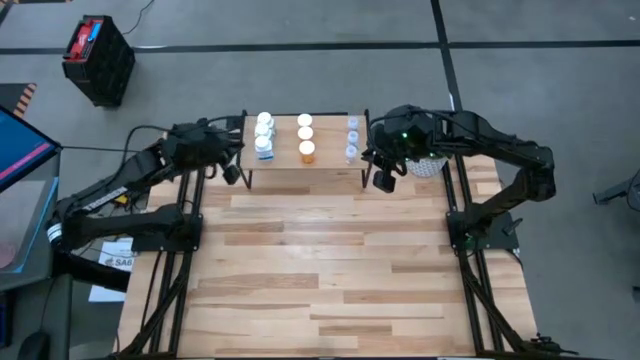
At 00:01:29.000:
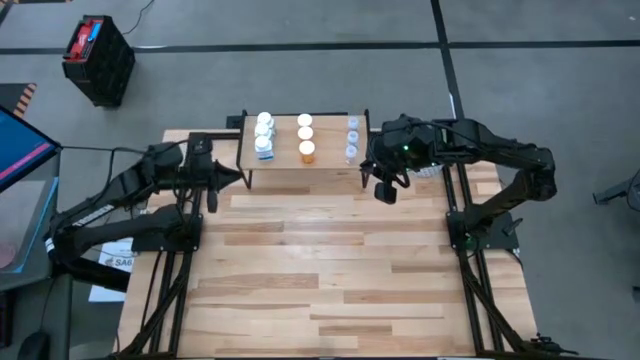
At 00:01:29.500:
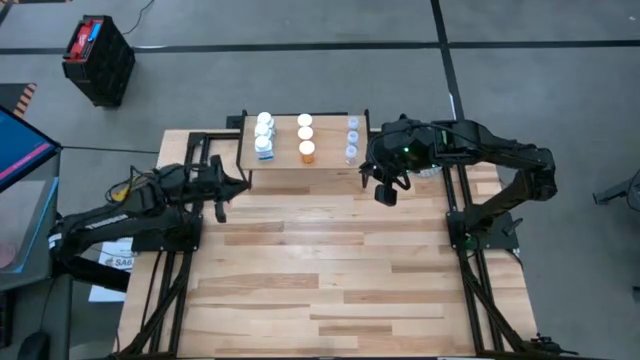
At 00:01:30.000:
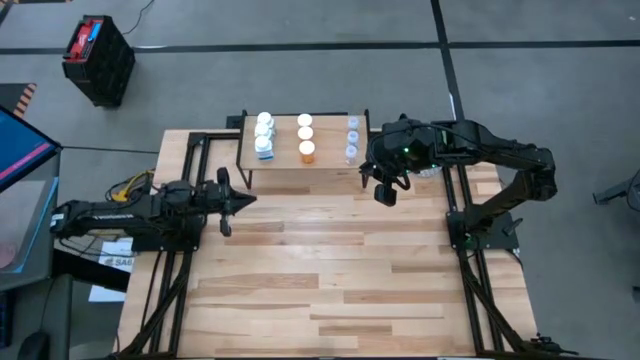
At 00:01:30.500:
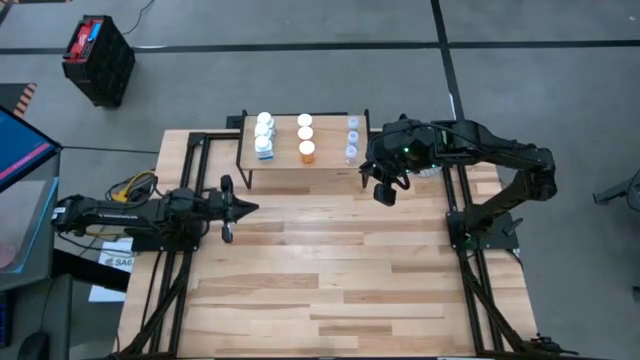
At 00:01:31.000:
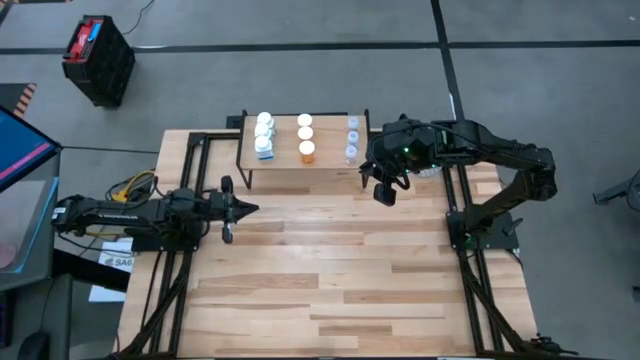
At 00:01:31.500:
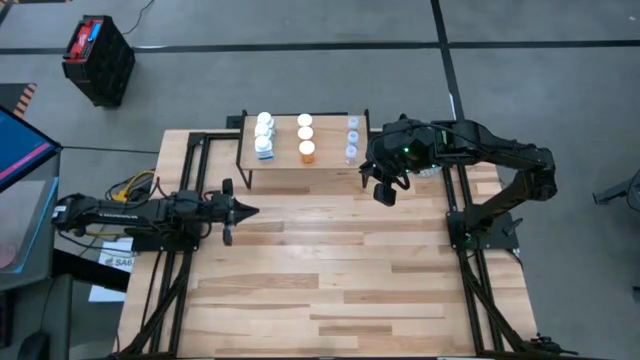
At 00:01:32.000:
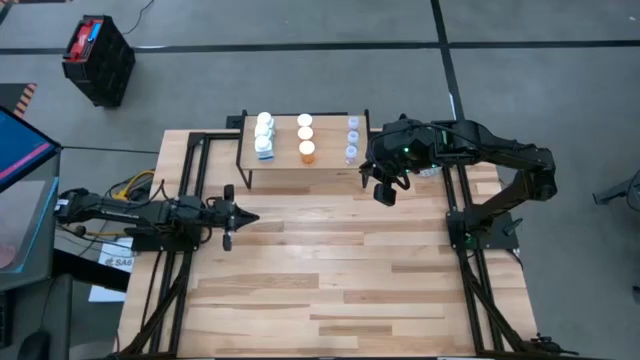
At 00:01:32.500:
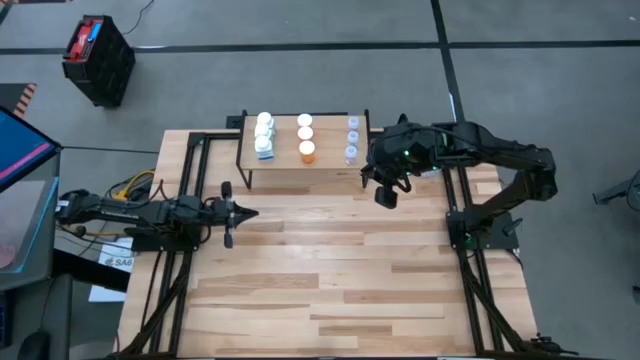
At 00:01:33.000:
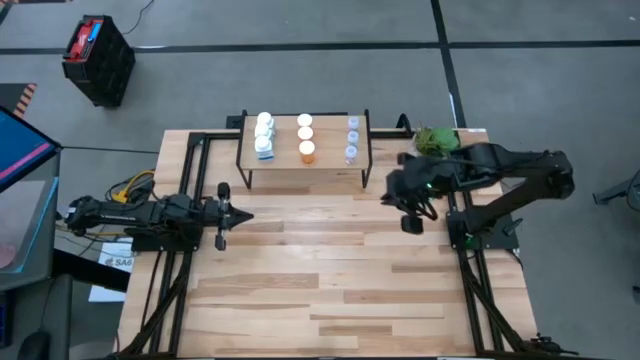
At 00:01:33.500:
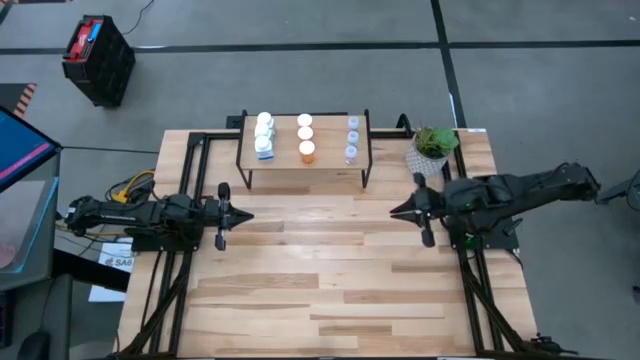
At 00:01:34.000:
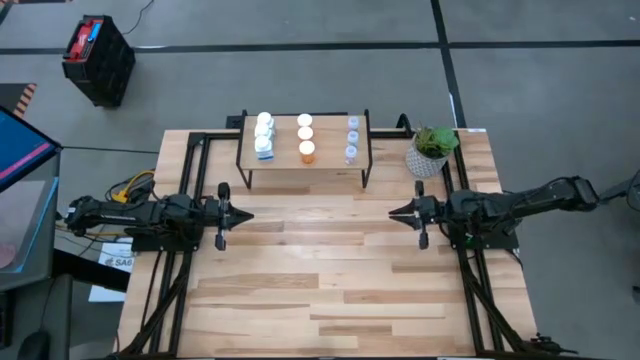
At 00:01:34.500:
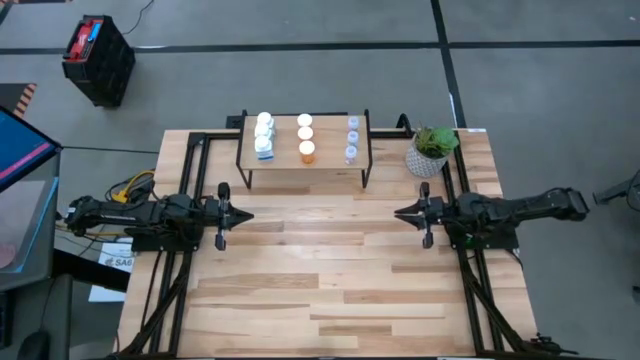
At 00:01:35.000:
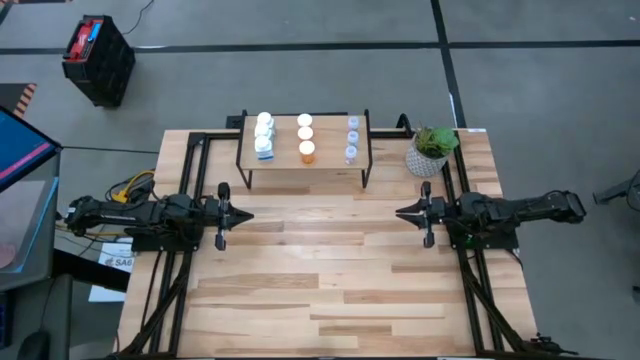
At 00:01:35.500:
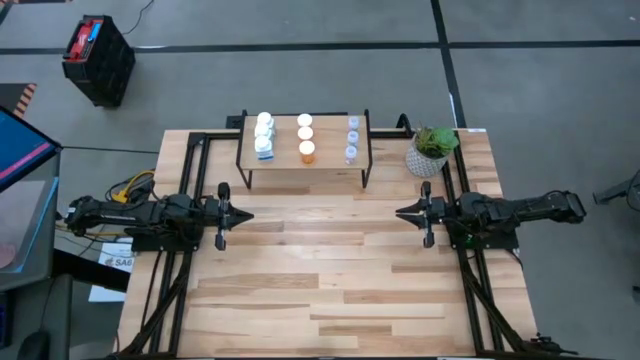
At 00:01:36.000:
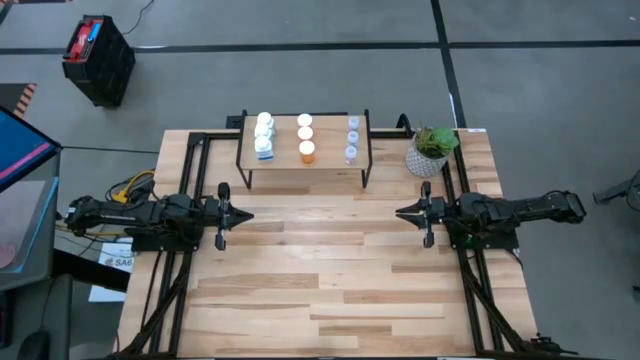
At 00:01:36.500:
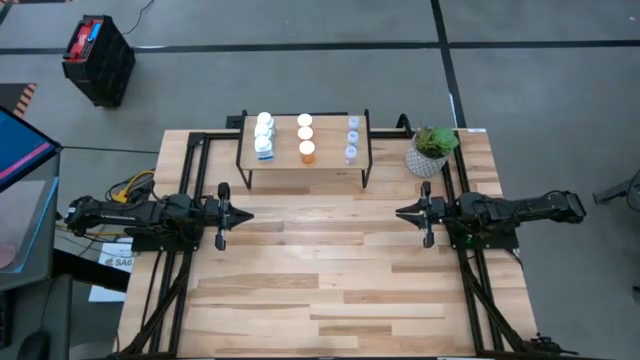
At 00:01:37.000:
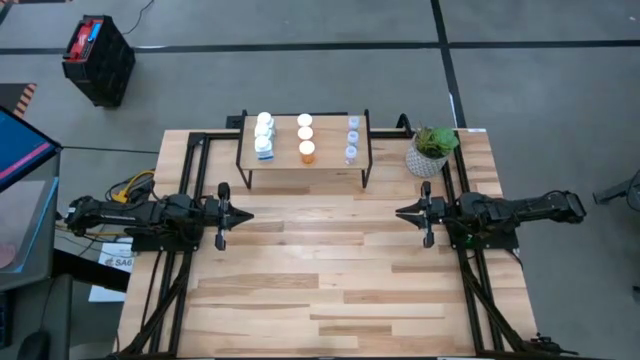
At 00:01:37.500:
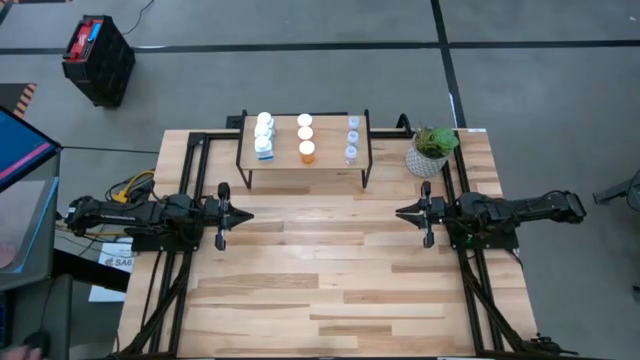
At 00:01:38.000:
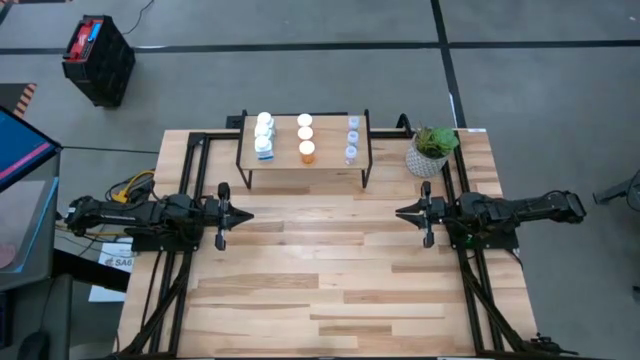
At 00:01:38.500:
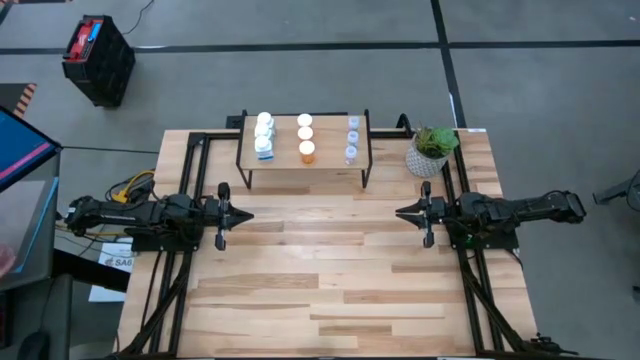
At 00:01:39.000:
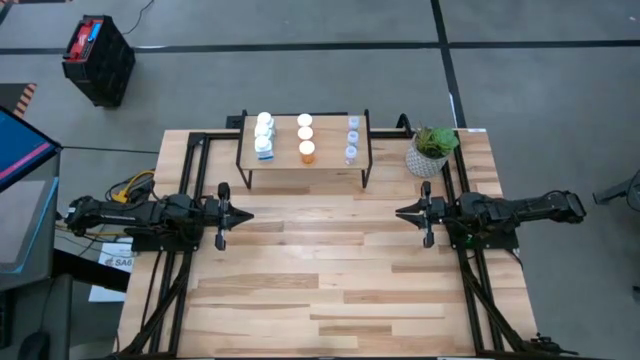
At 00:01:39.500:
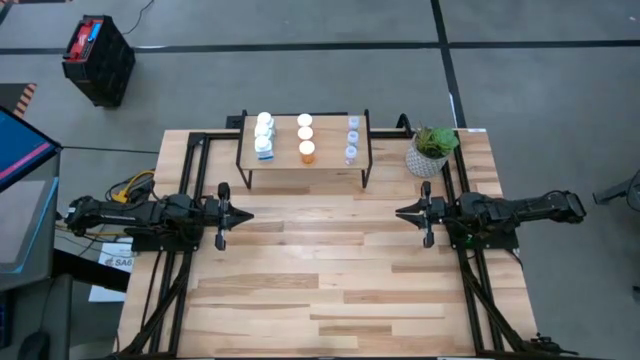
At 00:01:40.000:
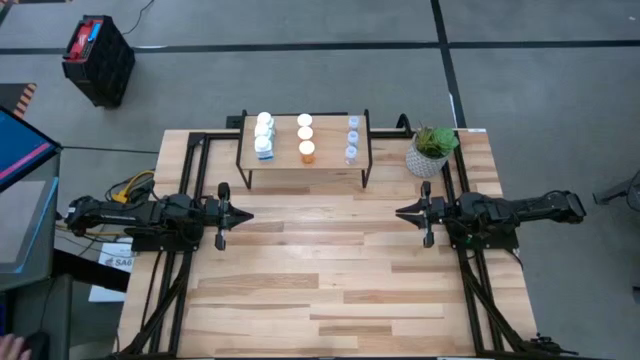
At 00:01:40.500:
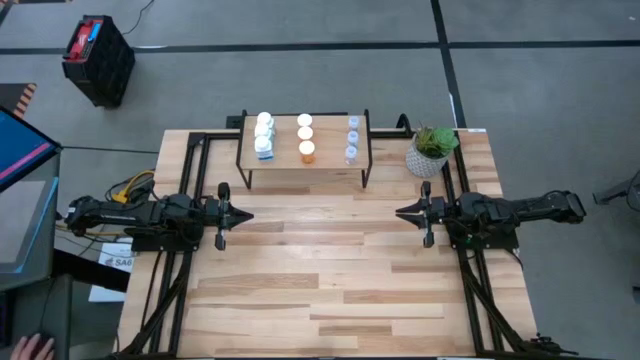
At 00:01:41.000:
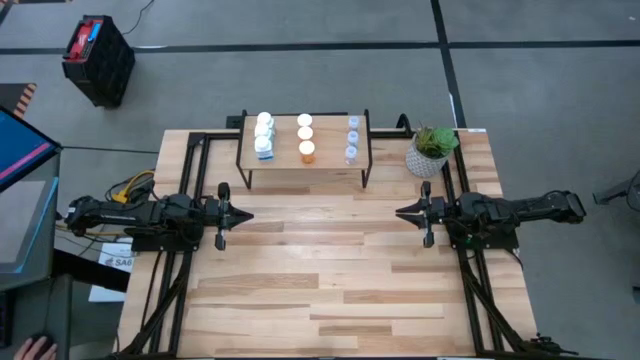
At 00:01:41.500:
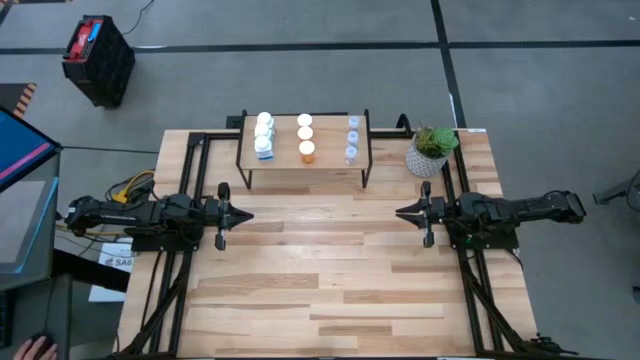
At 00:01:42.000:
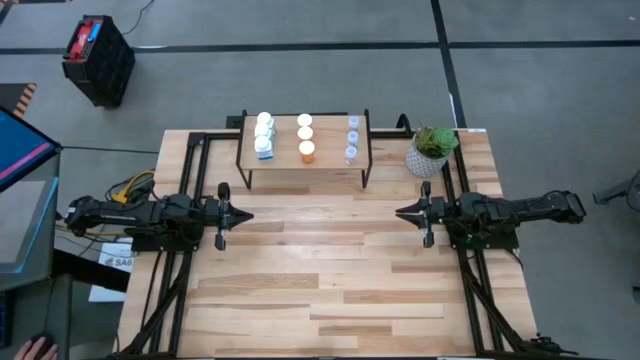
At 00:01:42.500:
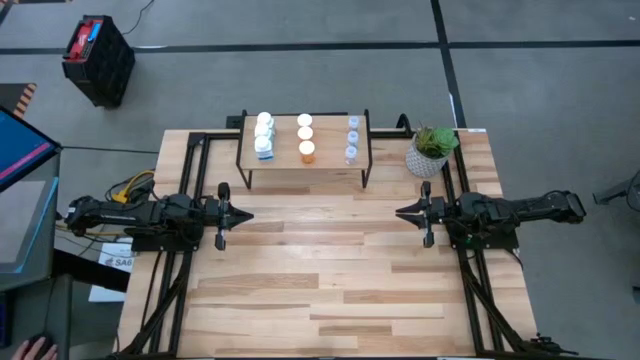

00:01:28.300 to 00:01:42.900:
Task: Pick and place medicine bottles onto shelf by color
Return to Home Position

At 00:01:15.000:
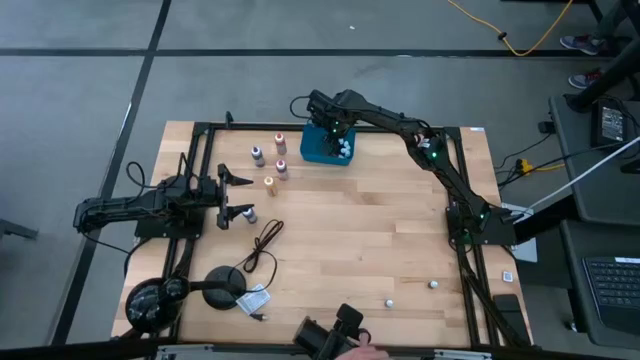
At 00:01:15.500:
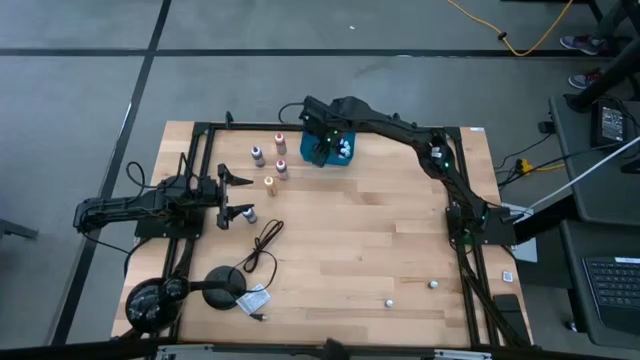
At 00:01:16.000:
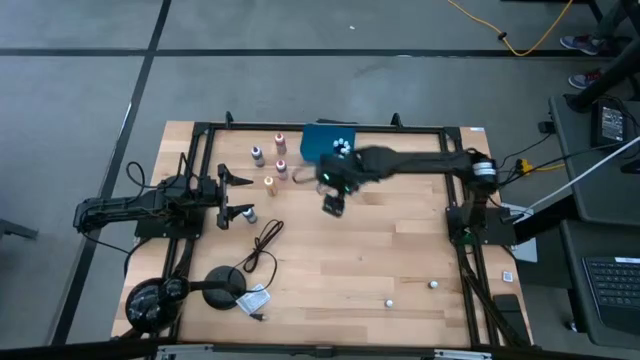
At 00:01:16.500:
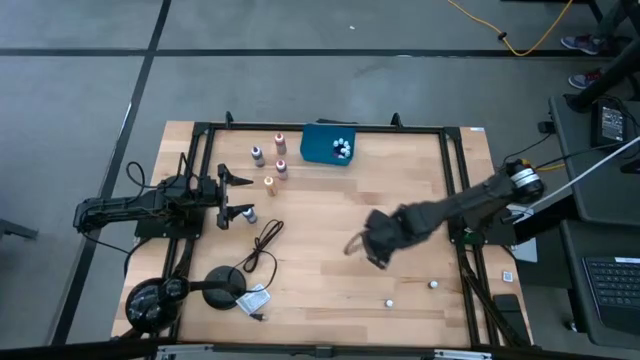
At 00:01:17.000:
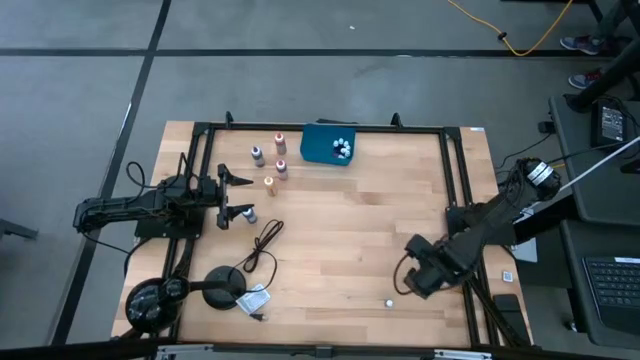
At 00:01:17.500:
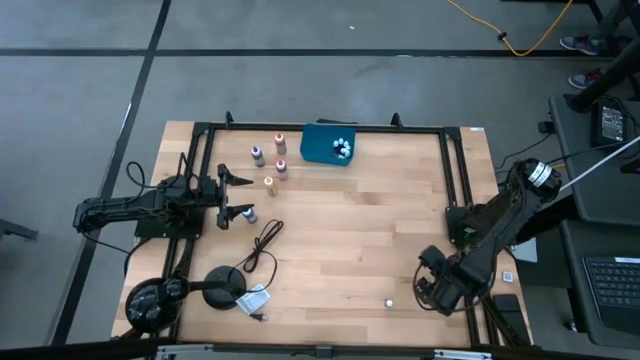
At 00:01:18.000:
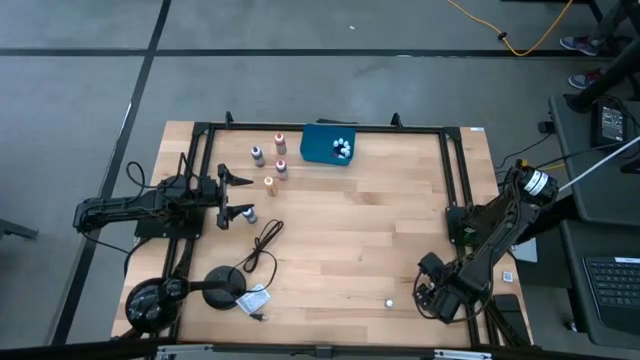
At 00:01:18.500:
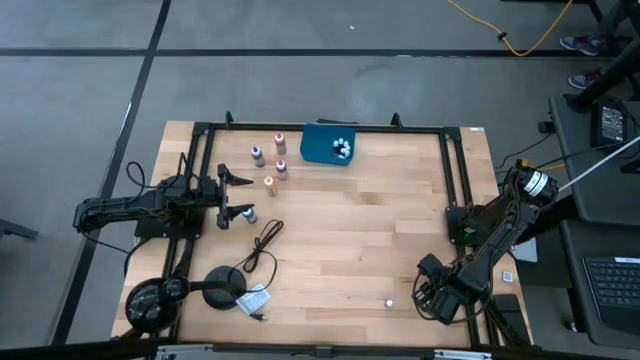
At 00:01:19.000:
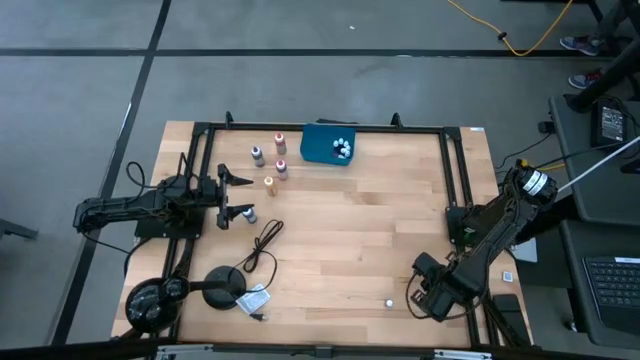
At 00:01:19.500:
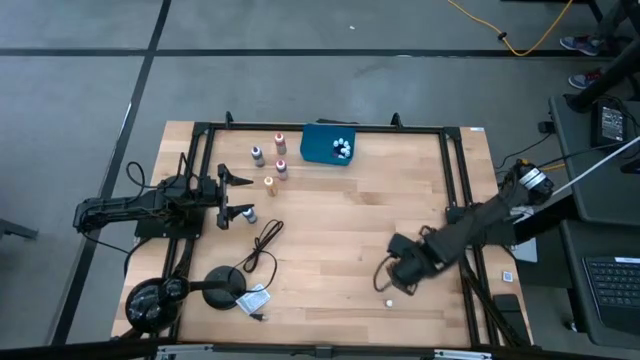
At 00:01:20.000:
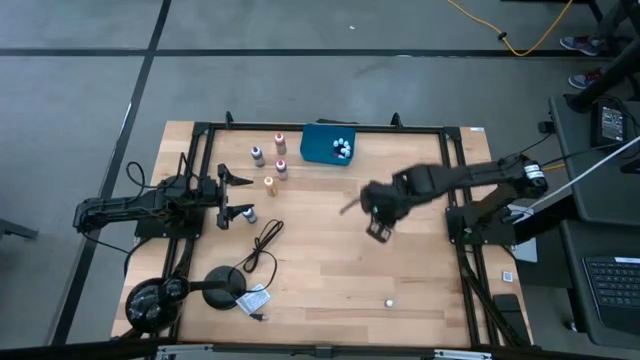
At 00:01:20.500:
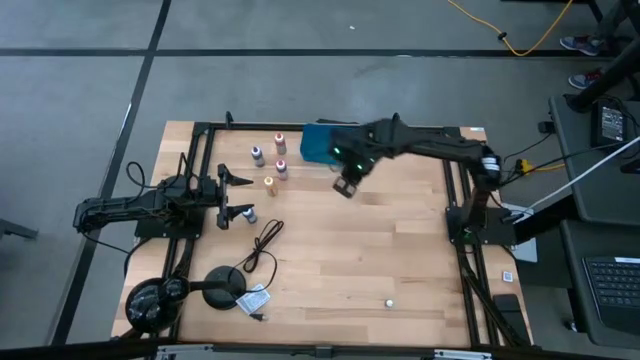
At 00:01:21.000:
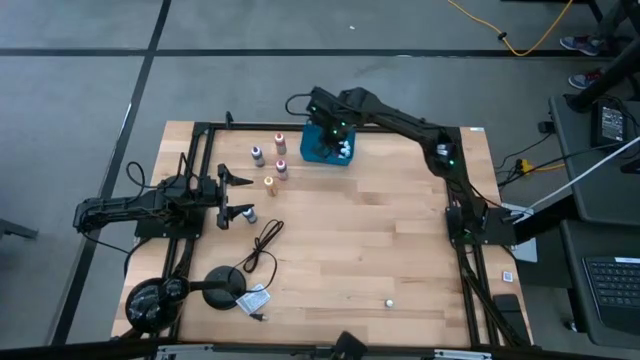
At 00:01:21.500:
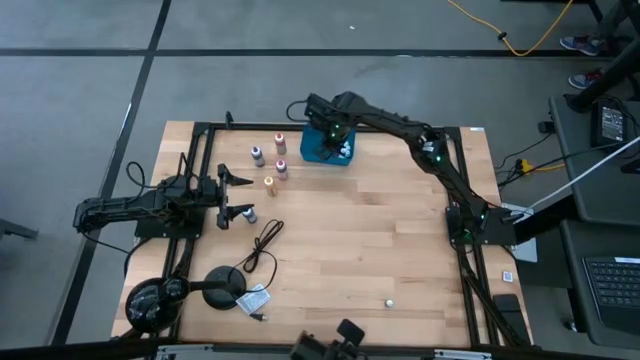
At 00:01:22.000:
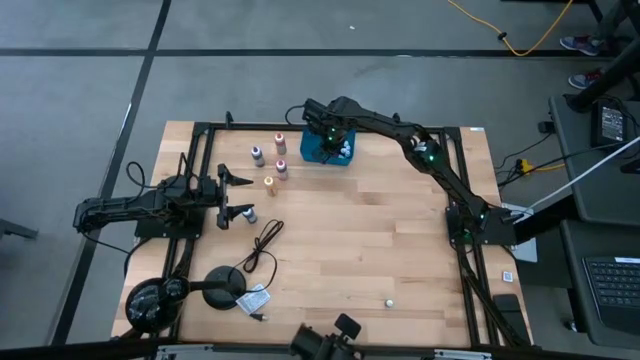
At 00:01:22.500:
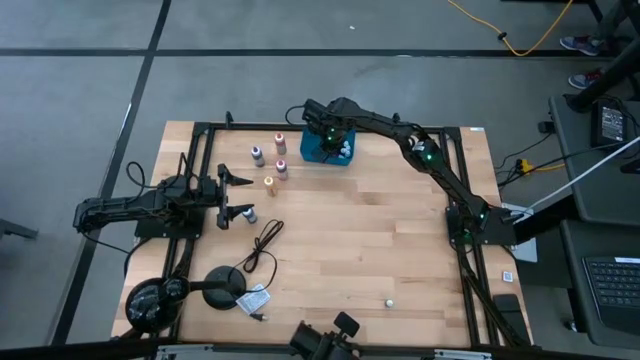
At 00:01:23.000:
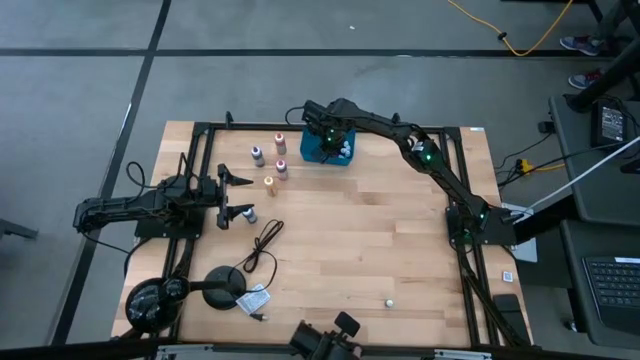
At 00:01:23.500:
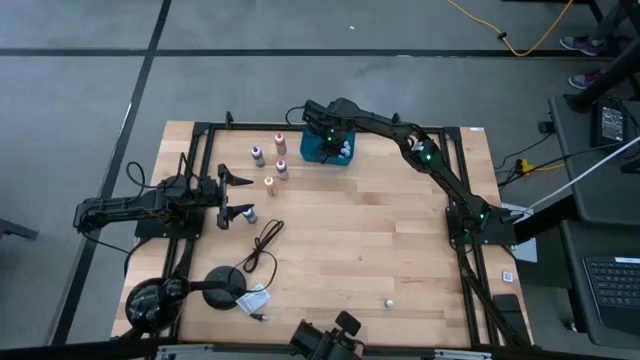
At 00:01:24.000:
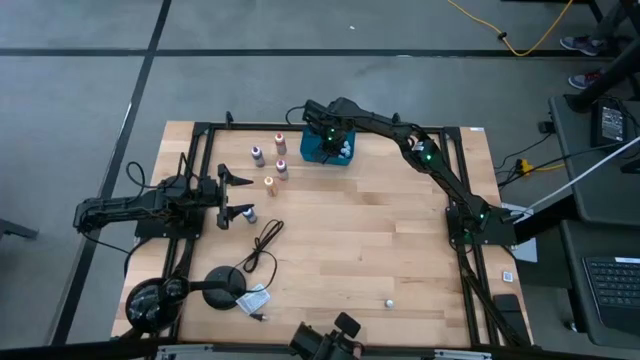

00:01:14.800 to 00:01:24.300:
Task: Pick & Place food coloring
Put the small black food coloring bottle into the blue container
